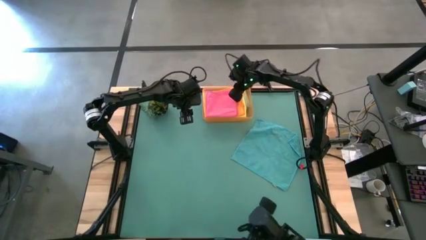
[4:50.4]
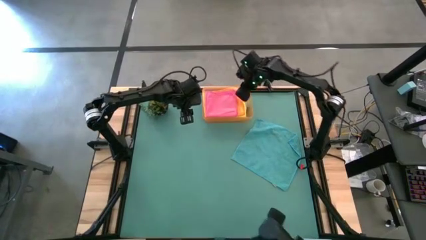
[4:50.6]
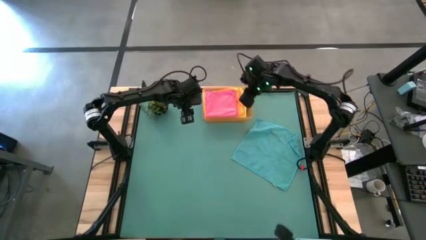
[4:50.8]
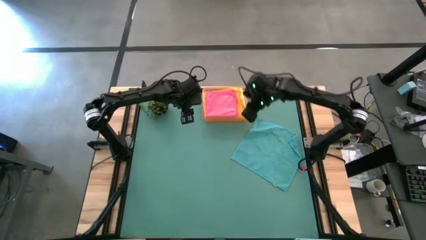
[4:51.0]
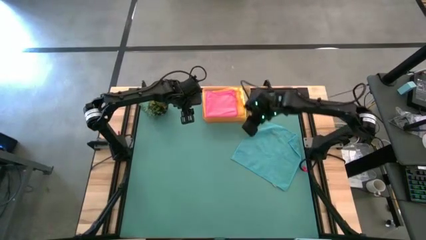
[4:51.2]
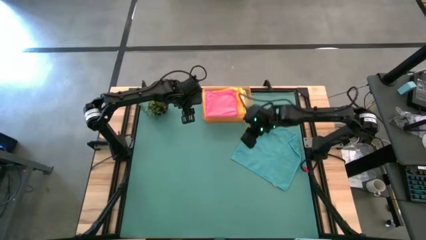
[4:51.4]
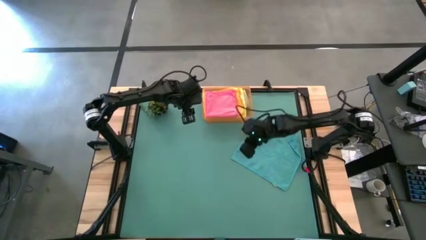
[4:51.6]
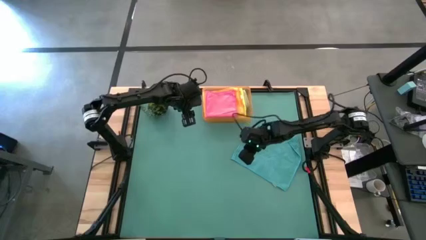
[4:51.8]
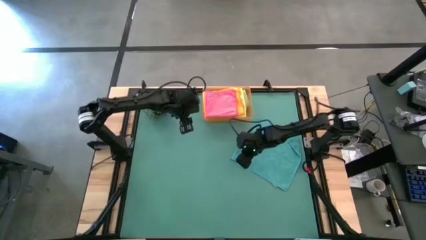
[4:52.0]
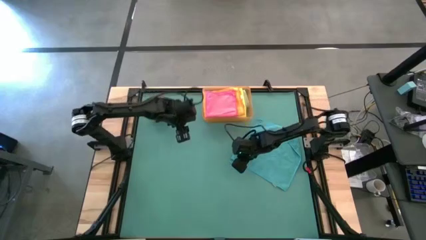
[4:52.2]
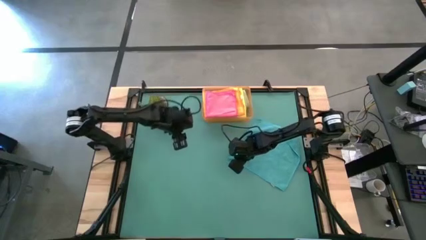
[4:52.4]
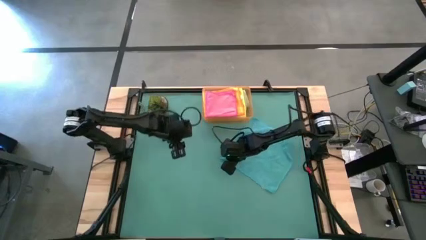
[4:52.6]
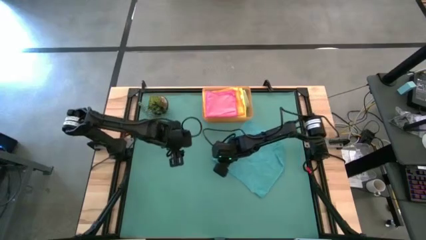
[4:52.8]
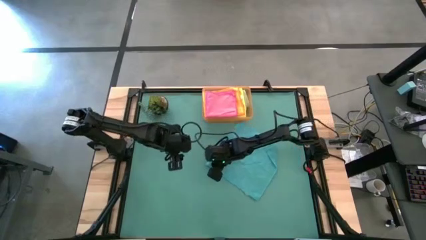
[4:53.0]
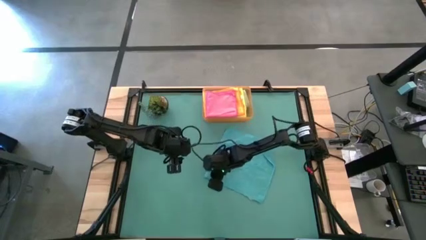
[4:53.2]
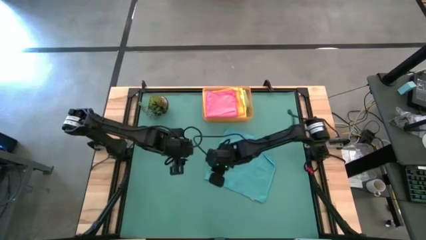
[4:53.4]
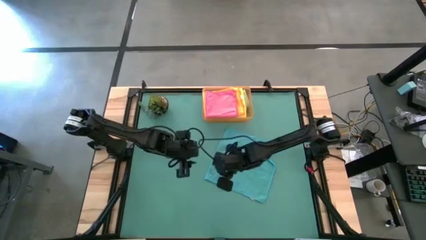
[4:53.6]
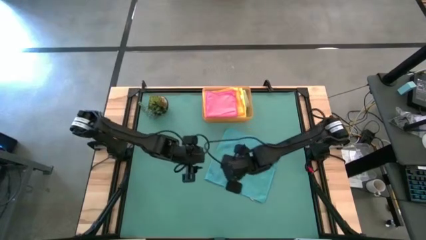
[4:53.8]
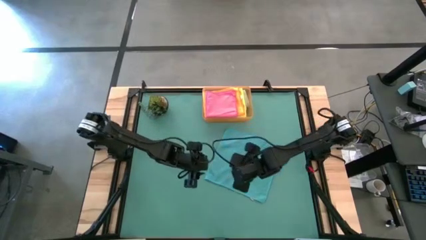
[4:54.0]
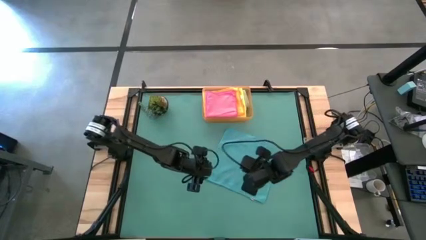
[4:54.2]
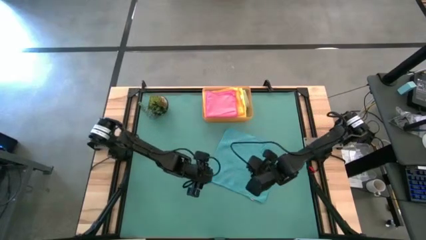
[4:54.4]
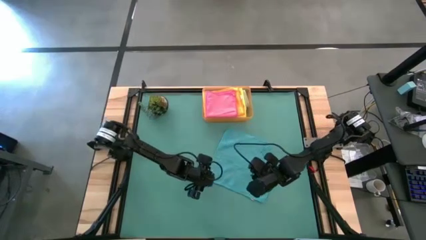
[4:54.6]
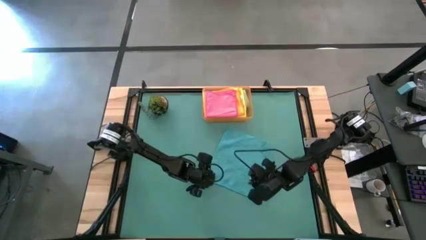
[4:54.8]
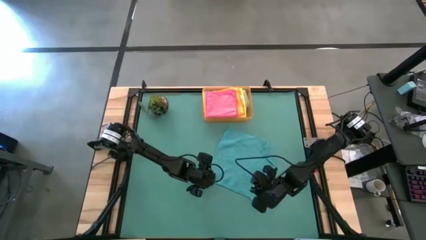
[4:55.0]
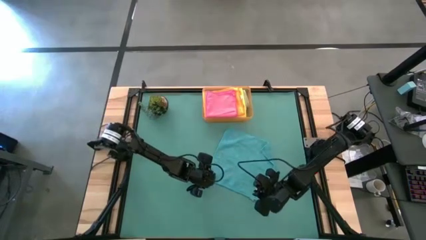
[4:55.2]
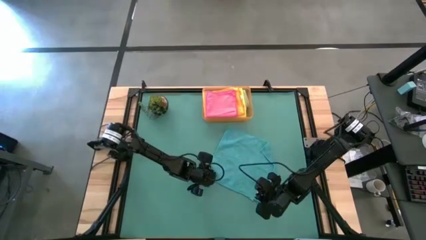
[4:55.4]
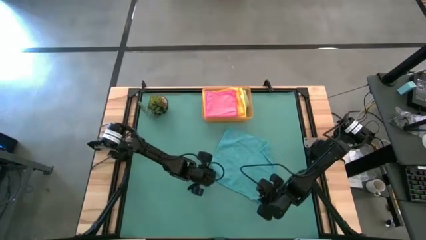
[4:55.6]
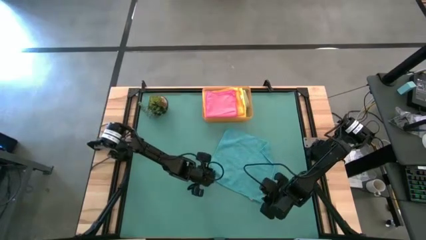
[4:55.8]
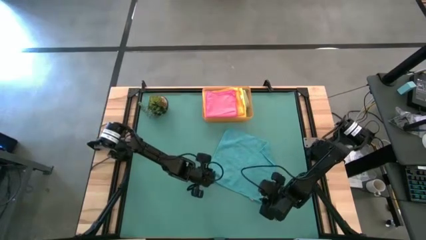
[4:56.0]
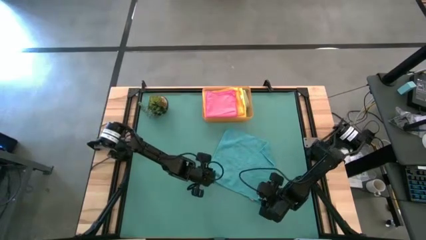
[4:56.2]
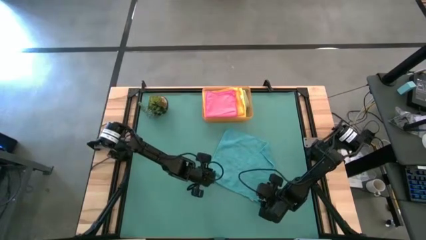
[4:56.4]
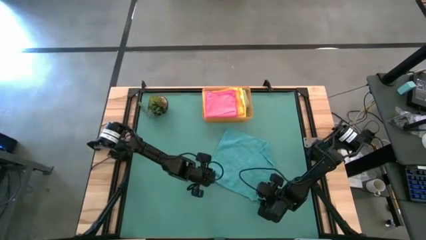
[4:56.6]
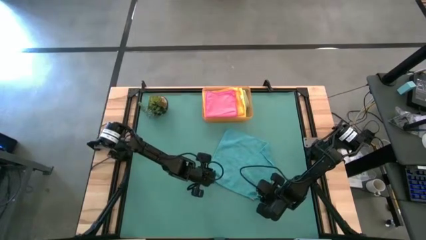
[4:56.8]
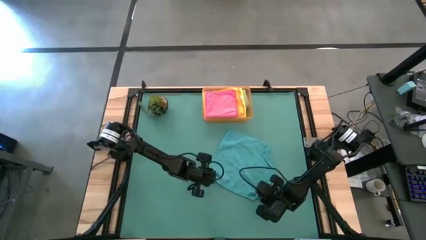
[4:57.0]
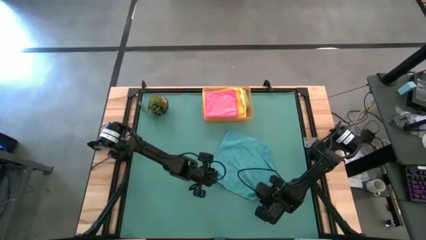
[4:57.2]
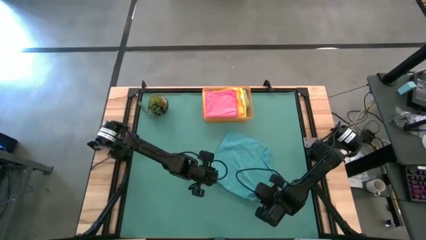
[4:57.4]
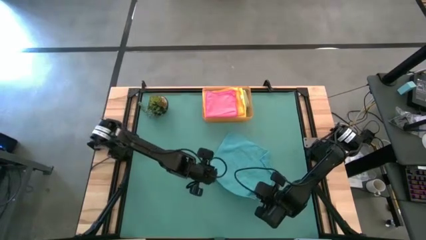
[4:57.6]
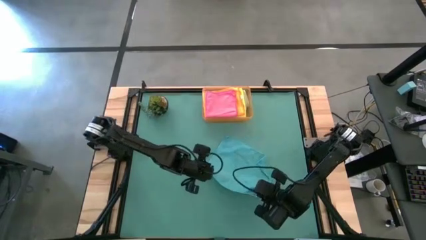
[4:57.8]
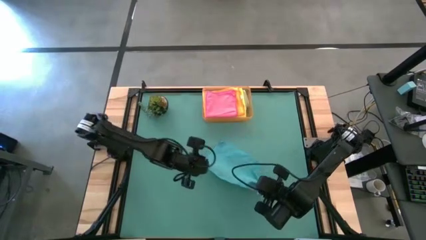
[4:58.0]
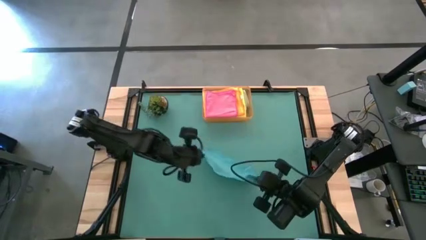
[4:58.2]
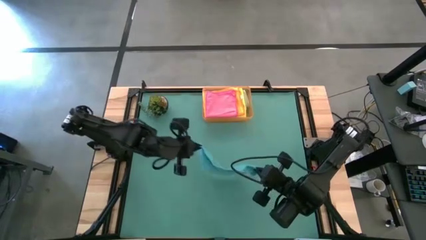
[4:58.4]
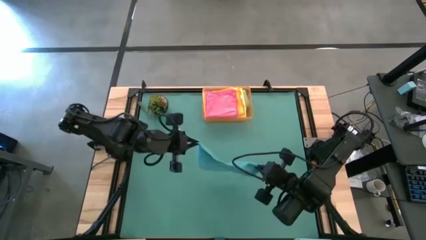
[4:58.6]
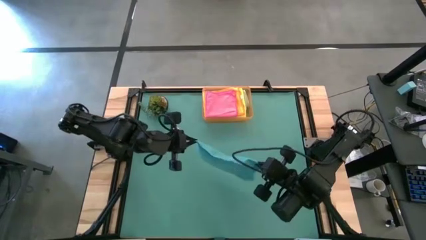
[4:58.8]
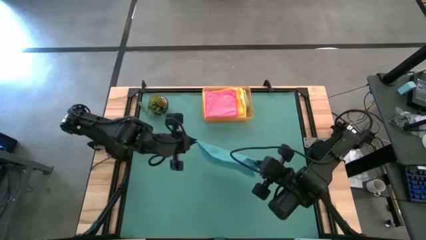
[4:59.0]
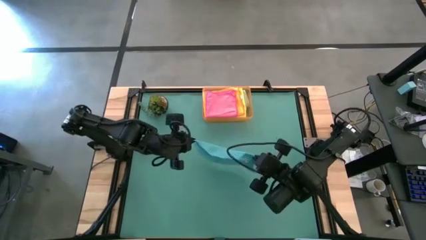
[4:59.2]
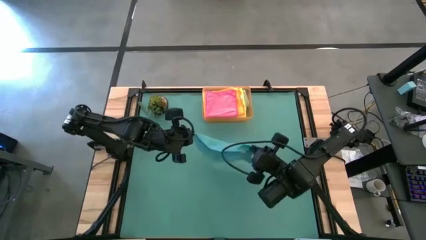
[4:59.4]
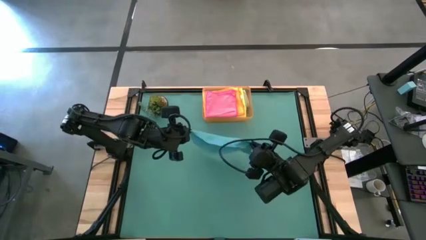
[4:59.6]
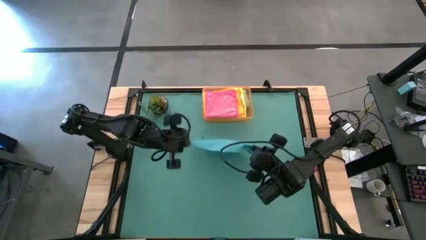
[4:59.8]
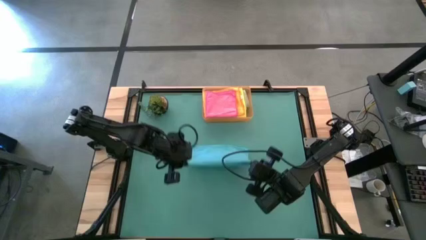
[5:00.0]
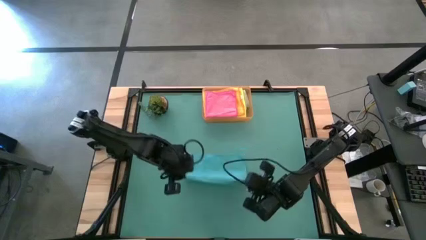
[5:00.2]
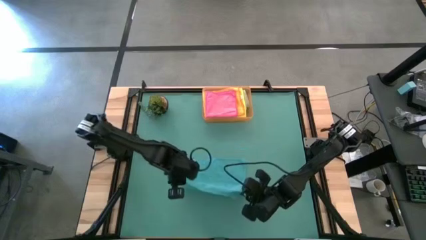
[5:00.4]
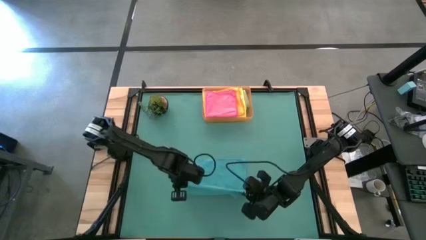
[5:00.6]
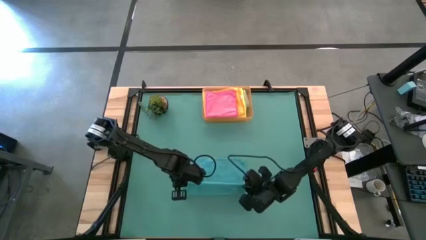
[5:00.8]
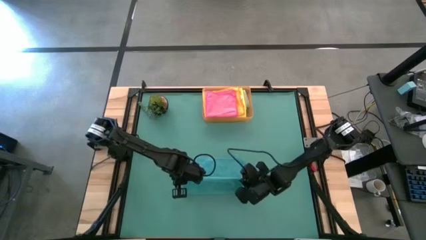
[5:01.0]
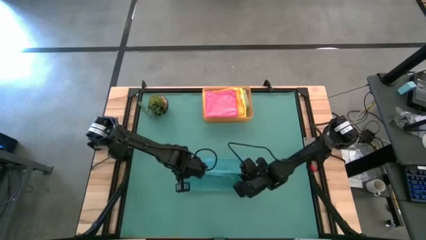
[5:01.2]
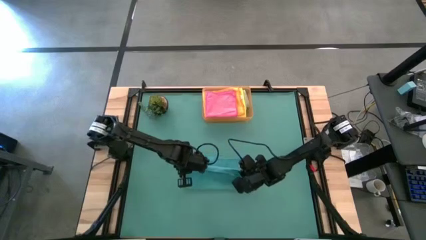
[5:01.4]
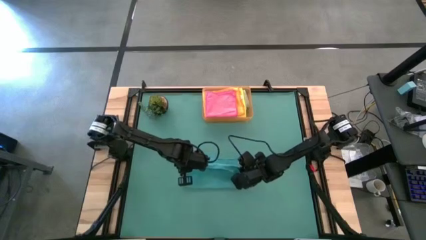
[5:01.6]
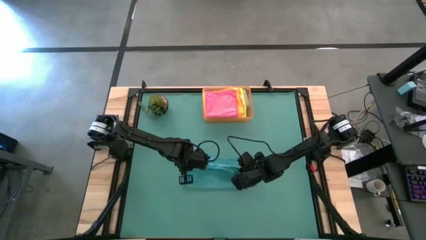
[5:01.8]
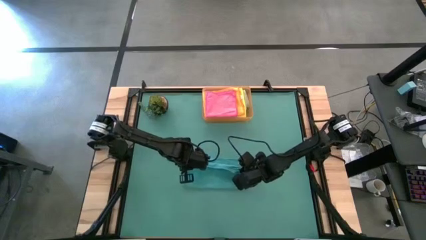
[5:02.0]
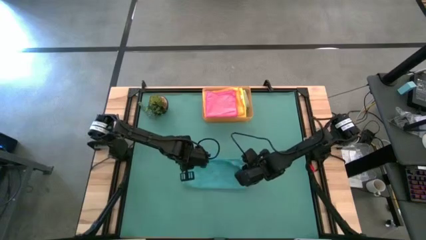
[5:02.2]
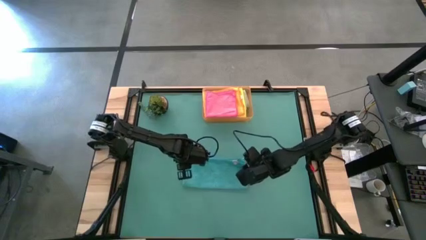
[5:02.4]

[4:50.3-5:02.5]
Task: Fold microfiber towels
Fold the green towel
